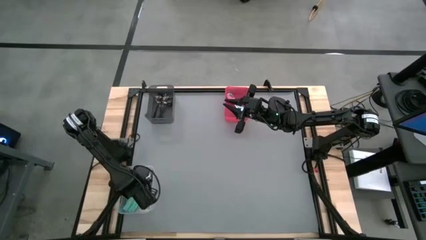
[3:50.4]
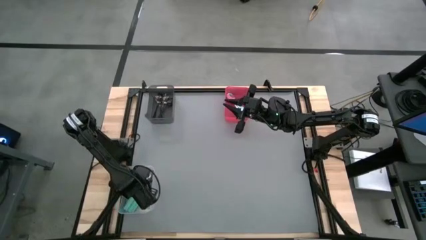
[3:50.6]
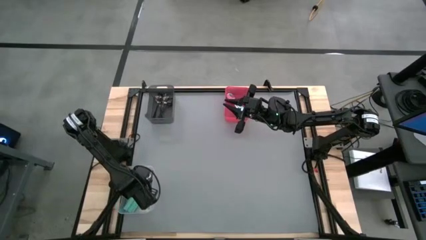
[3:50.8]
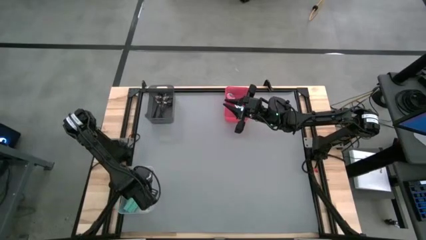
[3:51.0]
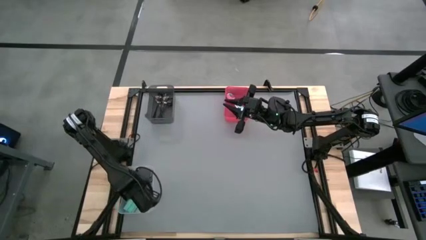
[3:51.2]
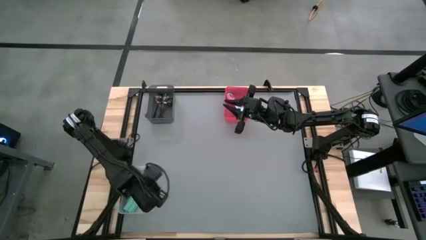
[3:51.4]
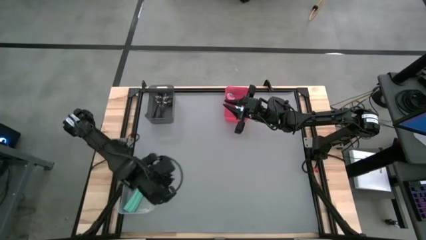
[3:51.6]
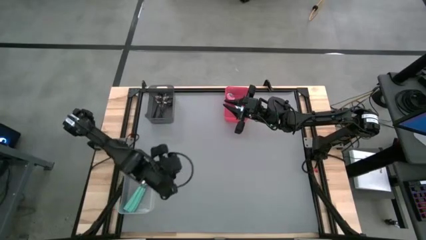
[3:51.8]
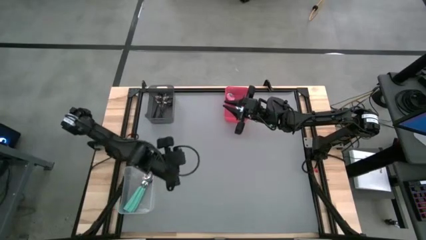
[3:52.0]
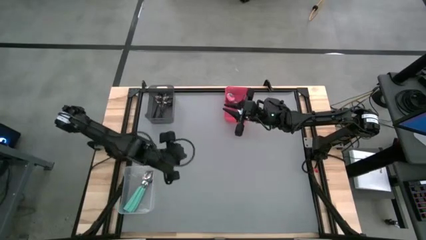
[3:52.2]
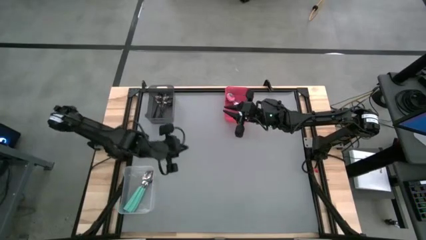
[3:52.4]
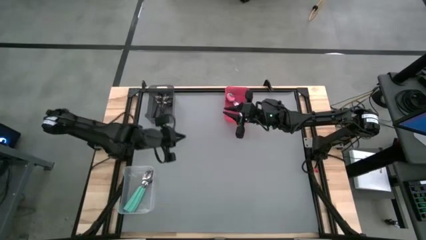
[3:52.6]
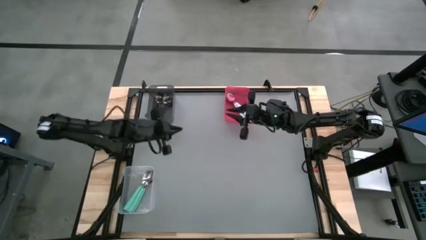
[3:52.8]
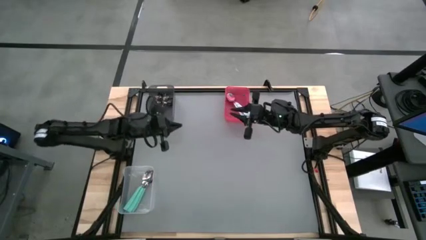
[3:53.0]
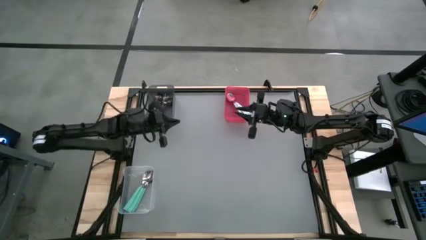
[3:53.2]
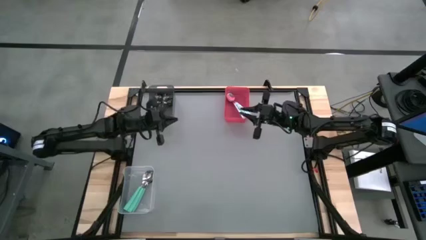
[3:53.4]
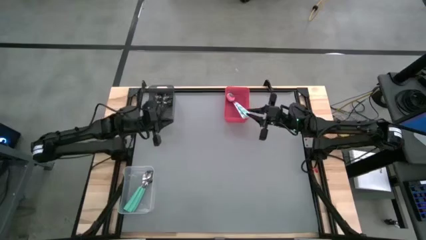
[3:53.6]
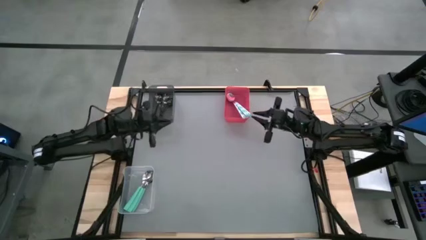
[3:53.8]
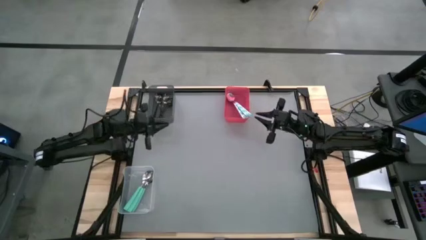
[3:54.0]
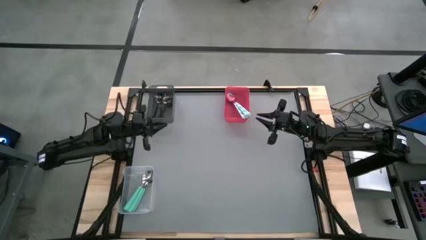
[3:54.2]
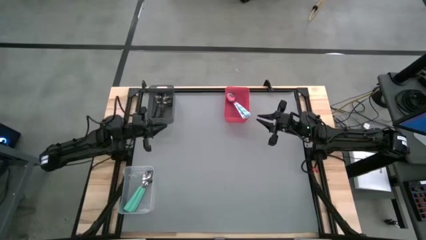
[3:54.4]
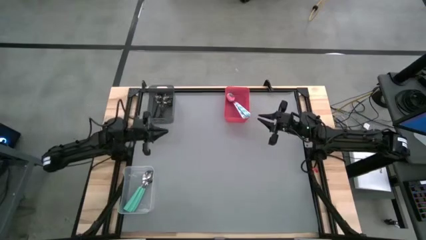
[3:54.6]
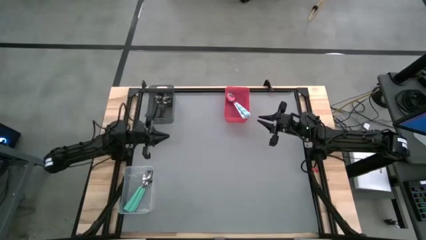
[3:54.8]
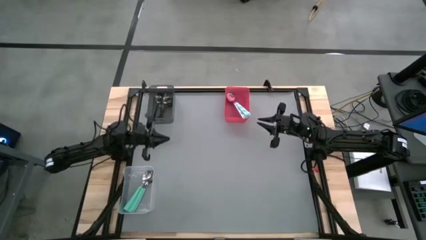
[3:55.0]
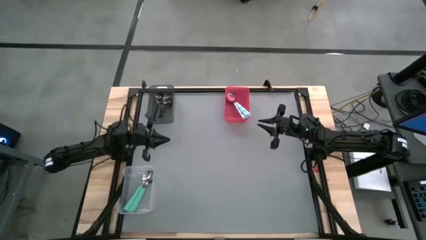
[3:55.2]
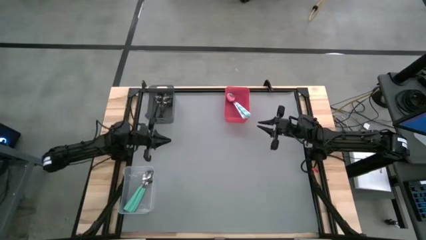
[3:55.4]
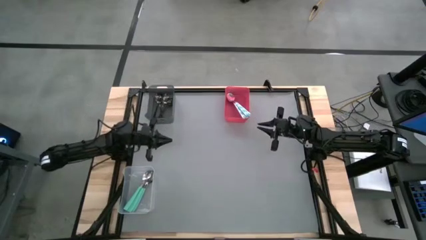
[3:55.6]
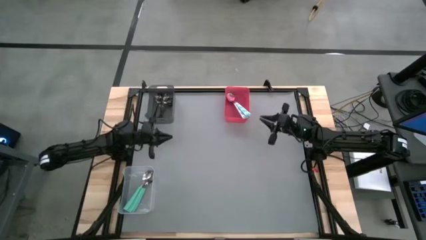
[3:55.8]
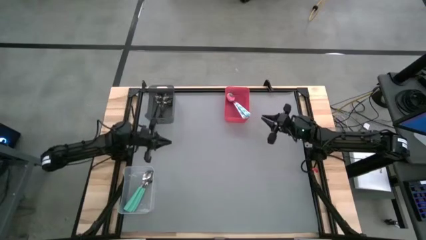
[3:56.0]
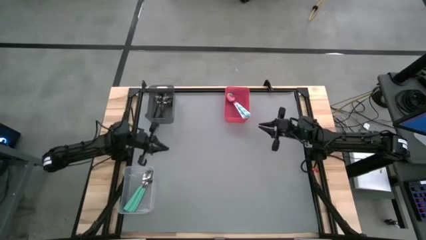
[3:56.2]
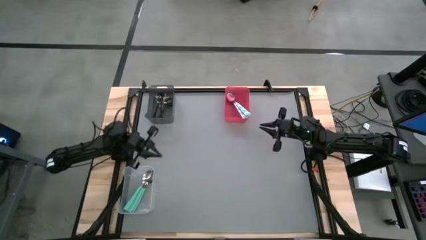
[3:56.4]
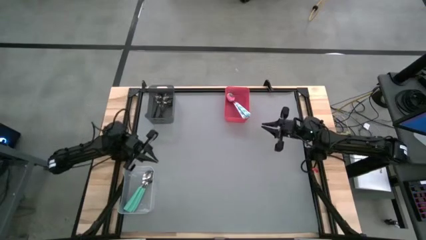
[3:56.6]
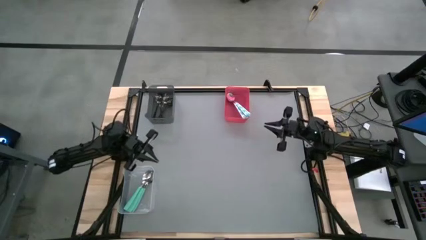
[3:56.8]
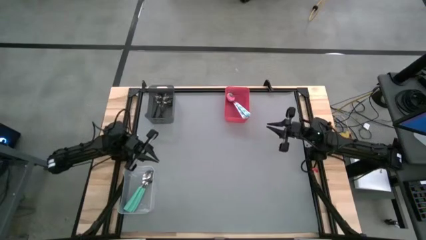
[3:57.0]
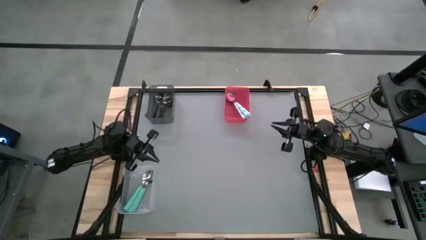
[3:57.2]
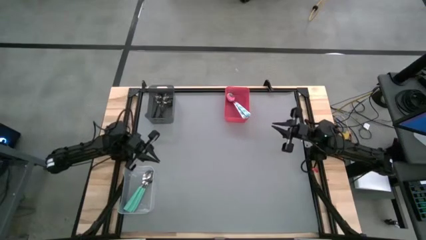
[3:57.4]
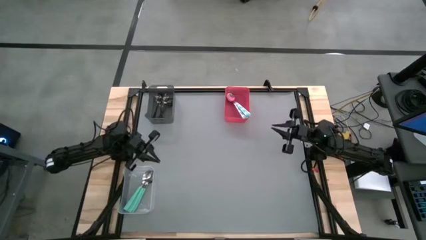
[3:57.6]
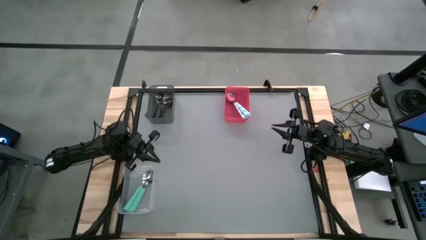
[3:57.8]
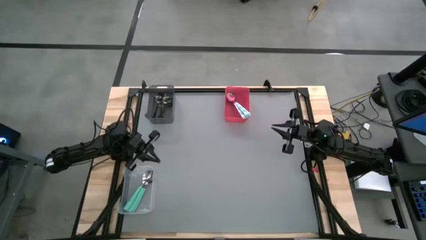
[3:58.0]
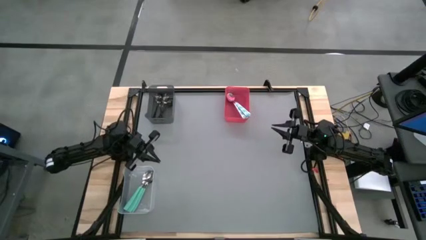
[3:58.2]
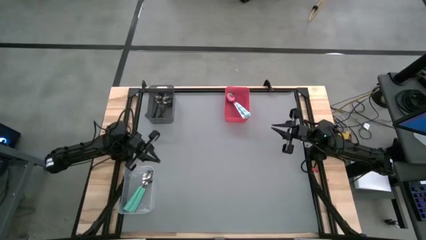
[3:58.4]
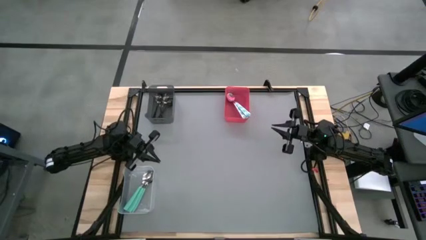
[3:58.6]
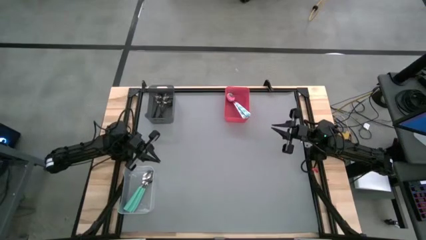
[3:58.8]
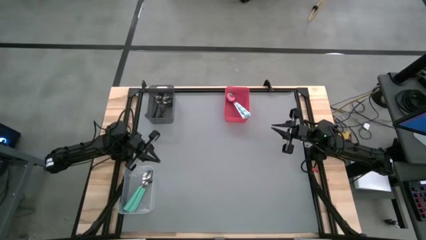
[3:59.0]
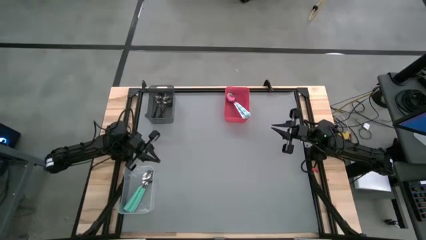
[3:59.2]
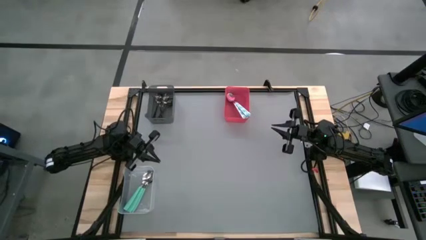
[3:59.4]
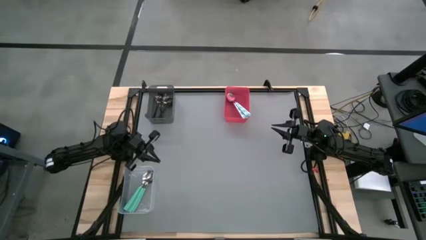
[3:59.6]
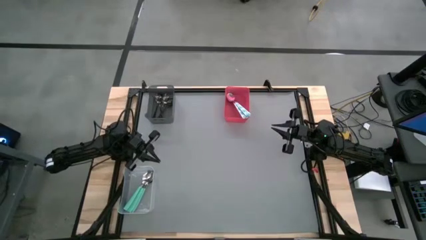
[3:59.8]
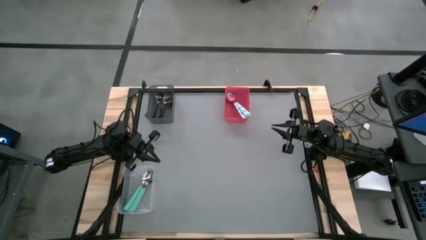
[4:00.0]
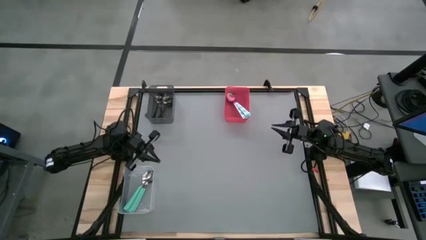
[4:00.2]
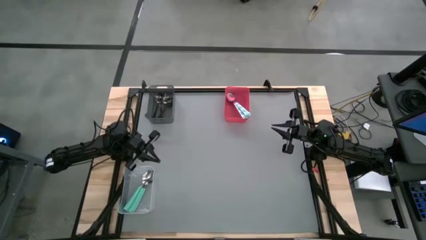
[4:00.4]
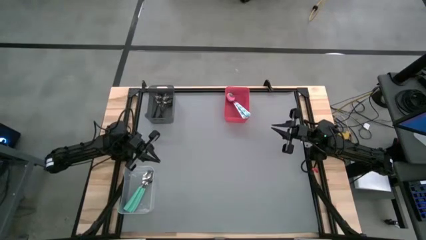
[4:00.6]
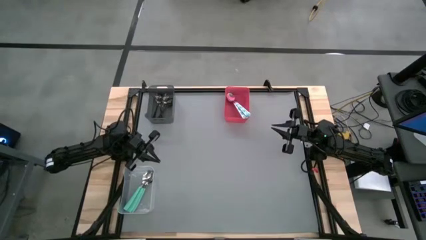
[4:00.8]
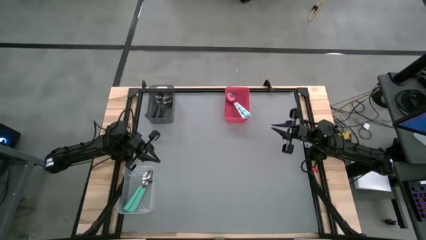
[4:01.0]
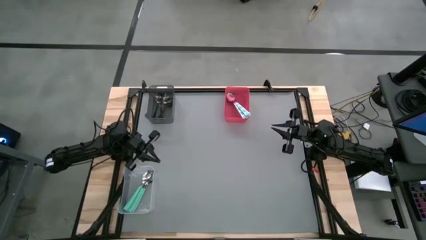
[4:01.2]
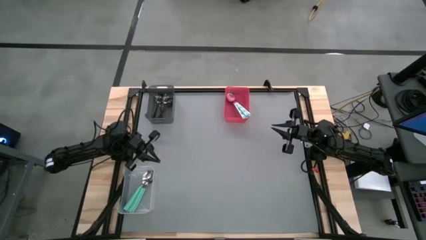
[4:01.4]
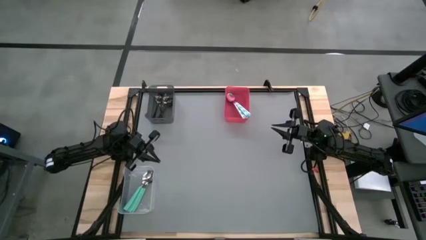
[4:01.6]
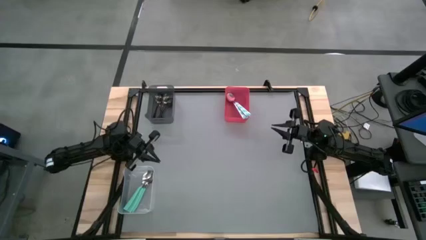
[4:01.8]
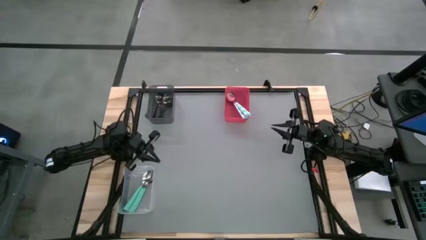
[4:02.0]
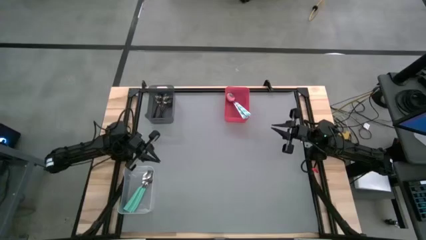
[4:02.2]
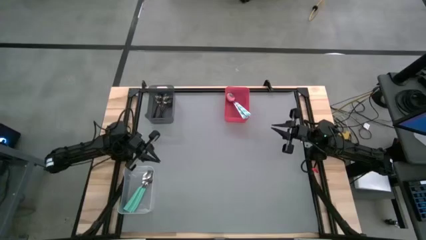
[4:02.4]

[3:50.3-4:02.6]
Task: Sort silverware by color (type)
Return to Home Position

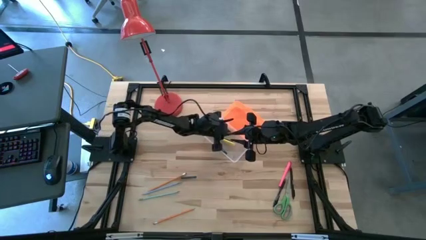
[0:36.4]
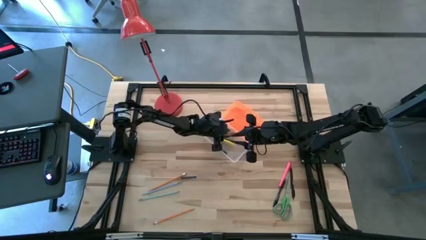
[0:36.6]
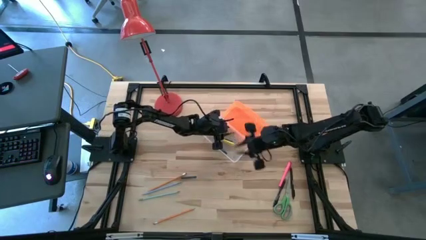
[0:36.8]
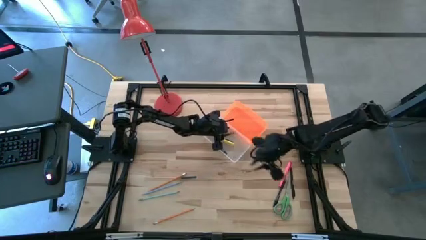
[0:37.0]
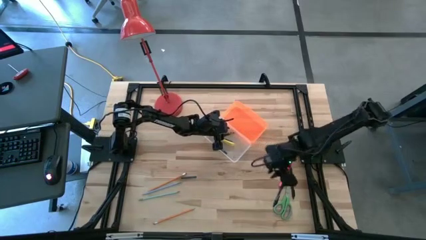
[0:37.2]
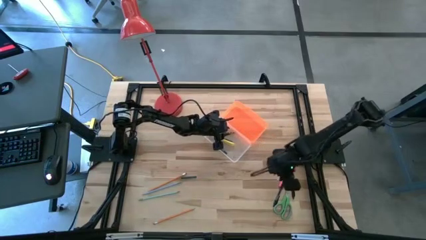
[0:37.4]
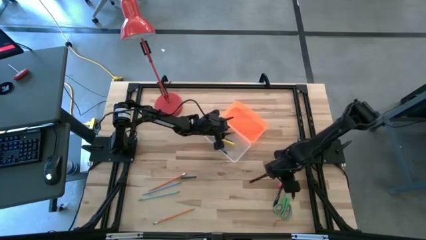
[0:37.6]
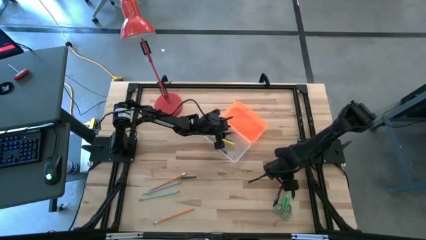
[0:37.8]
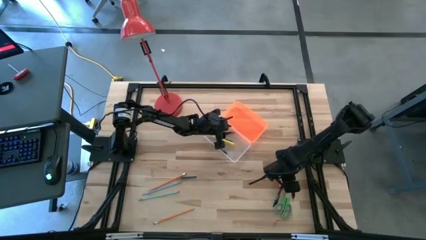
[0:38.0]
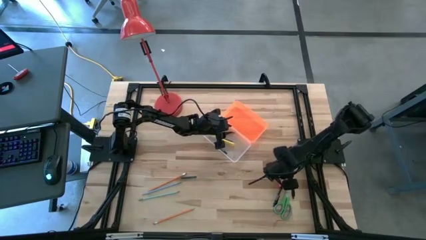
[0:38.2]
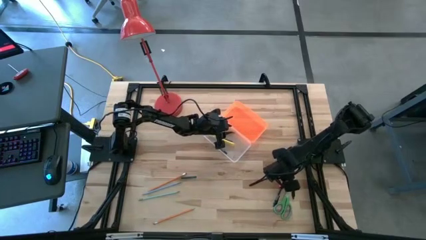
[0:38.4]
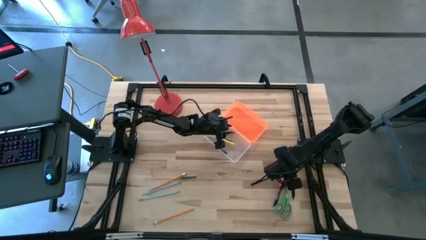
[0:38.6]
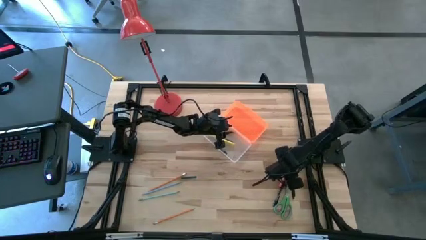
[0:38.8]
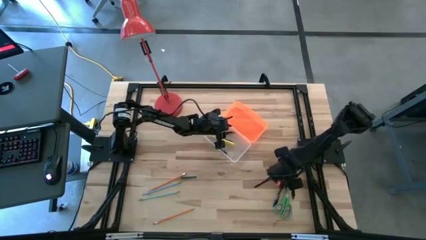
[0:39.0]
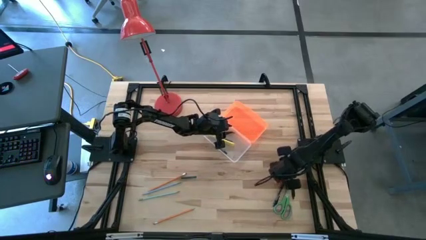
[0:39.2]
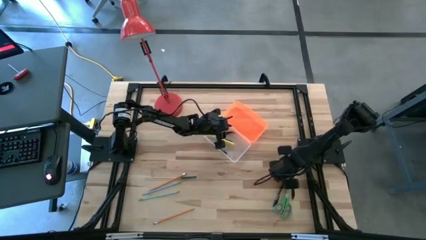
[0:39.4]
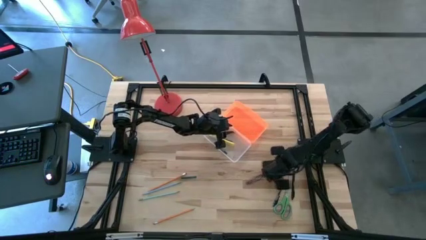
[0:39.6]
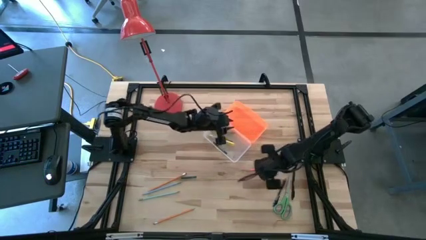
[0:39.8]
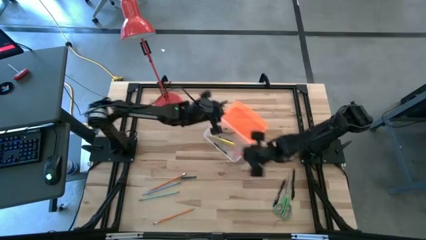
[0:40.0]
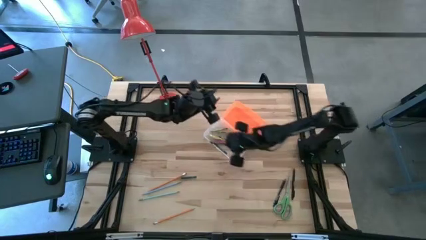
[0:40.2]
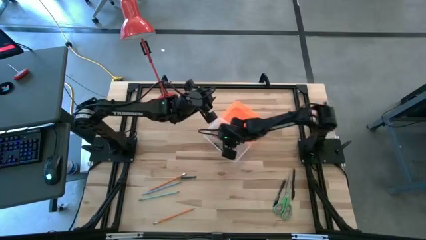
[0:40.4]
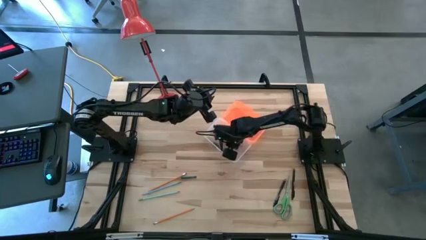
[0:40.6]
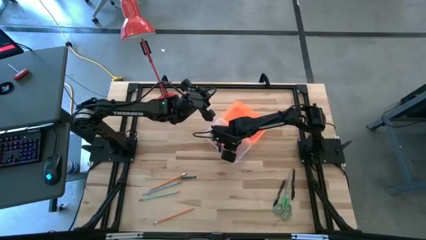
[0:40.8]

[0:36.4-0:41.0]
Task: Pick & place school supplies into a supply box
Put the pink pen into the supply box
